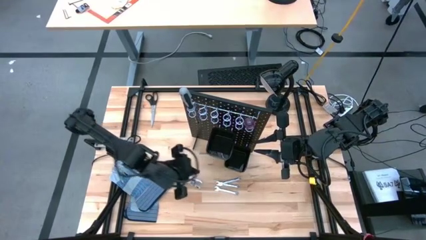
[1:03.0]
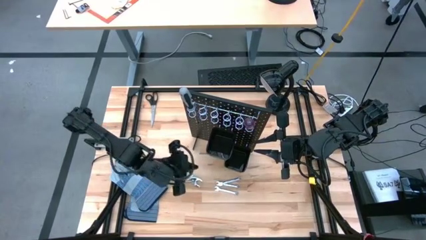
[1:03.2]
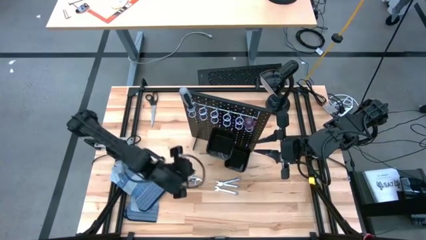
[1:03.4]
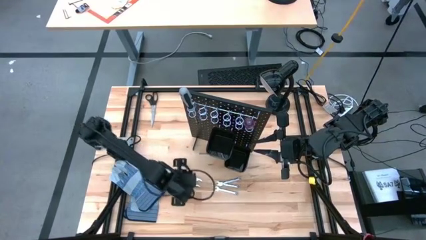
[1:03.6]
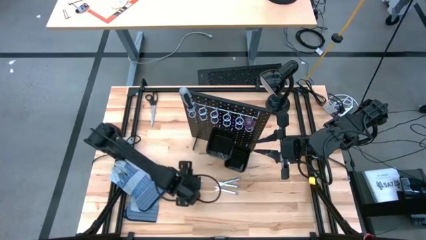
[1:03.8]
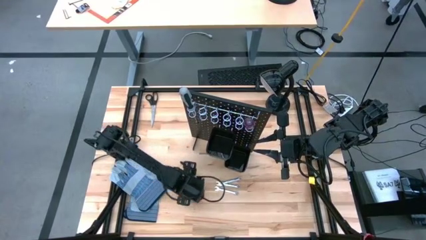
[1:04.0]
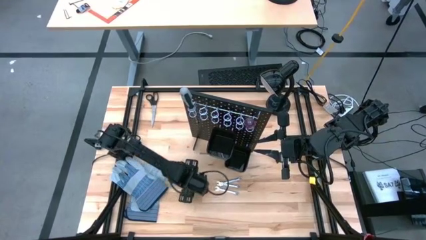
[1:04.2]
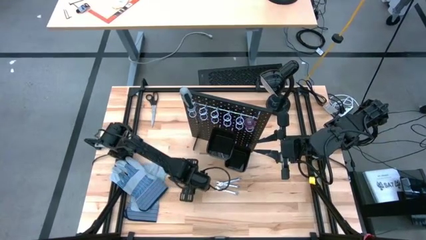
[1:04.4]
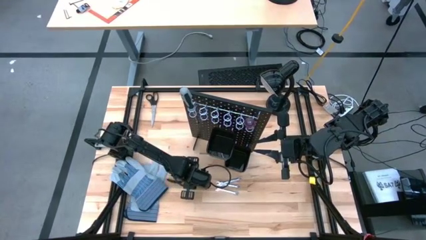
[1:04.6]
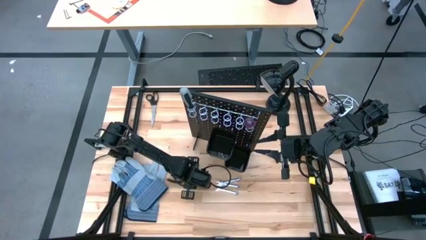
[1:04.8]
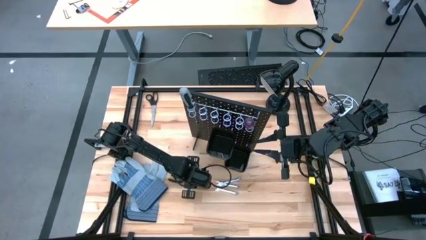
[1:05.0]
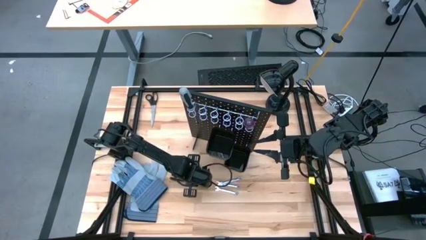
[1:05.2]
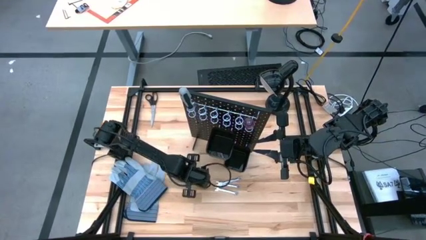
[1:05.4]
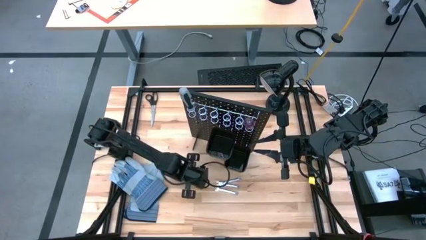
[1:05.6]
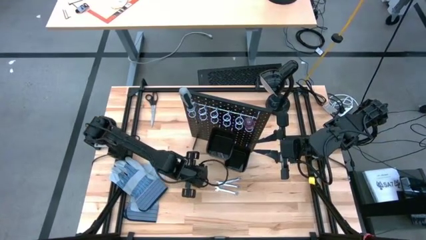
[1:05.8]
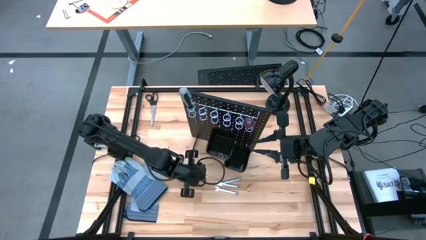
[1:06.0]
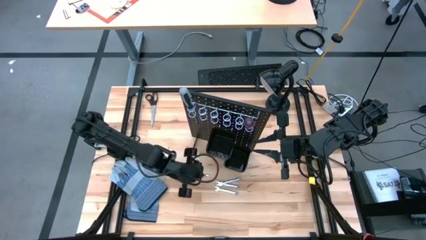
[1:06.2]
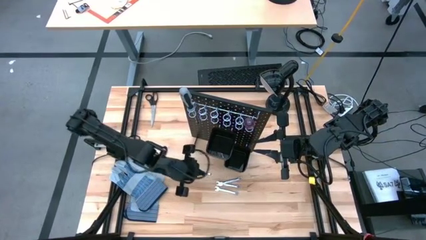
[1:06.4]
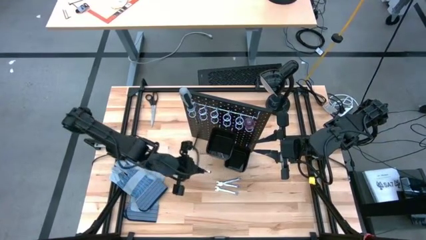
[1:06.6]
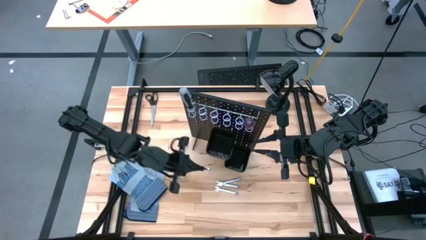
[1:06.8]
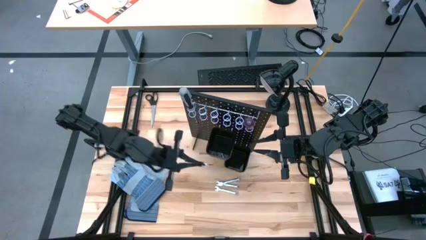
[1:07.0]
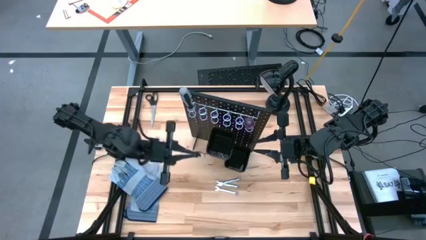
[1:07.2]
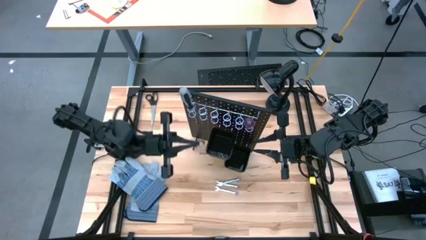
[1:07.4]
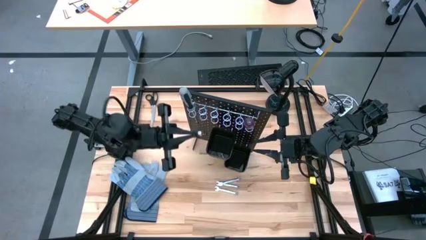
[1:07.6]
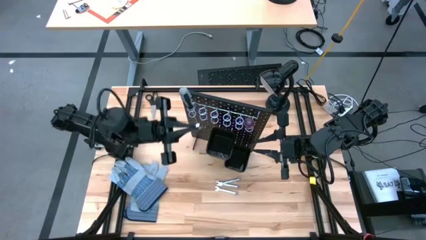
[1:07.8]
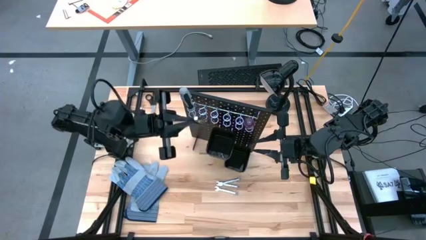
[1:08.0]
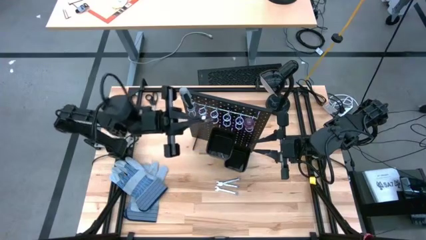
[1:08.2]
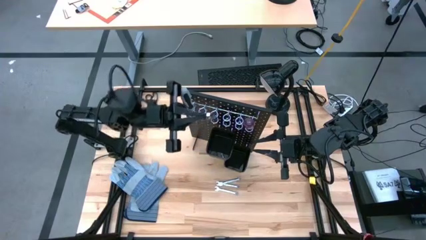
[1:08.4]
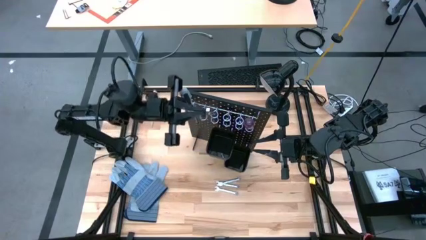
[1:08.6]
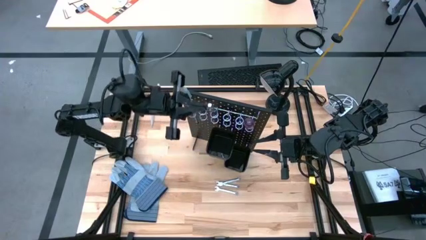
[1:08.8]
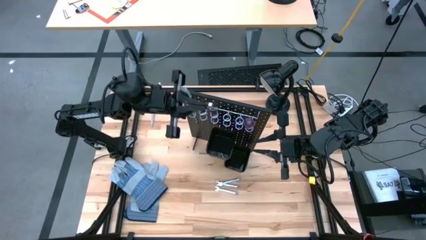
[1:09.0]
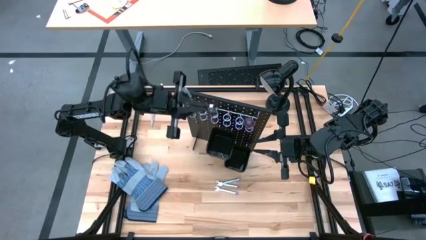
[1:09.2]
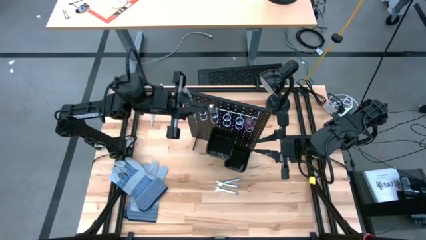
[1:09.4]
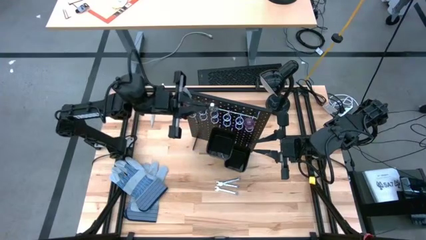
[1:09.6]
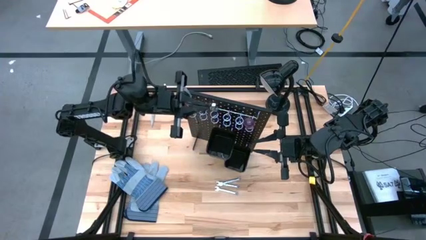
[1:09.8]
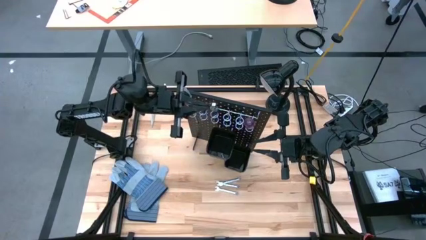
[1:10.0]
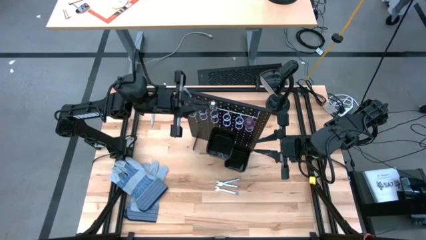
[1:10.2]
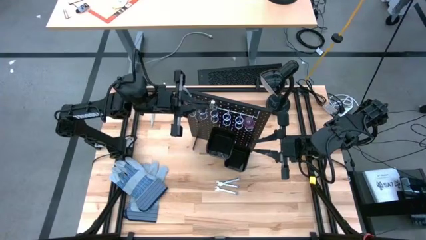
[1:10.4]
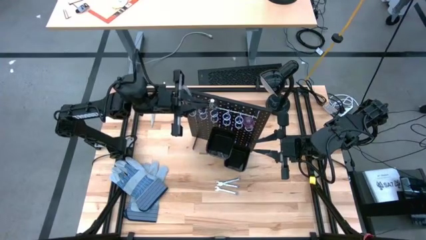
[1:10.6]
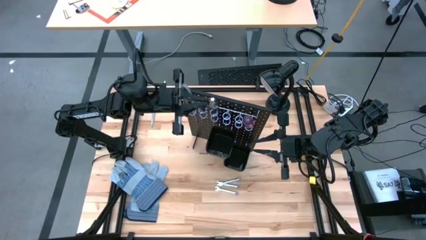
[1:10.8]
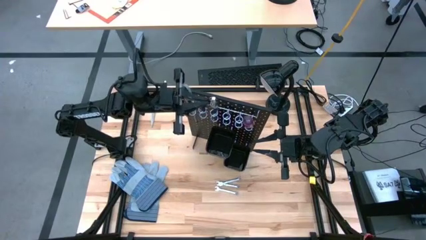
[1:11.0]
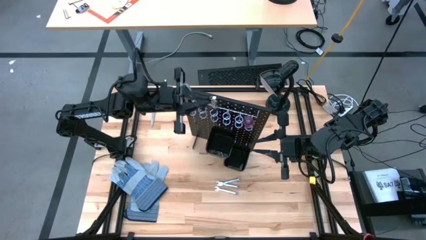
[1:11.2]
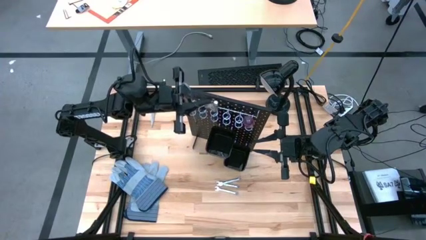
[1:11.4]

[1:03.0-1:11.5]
Task: Hang tools onto peg board
Hang the black pliers on the black peg board
